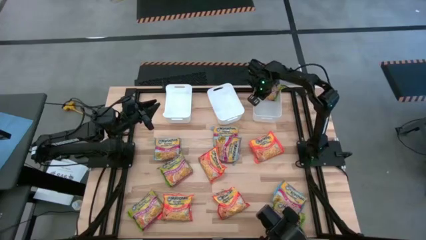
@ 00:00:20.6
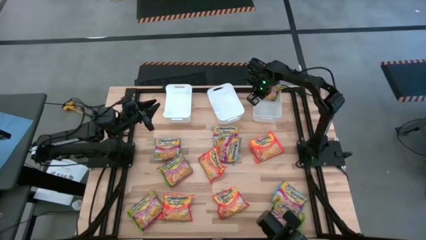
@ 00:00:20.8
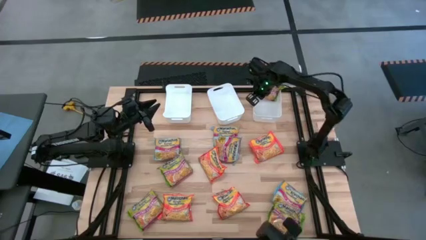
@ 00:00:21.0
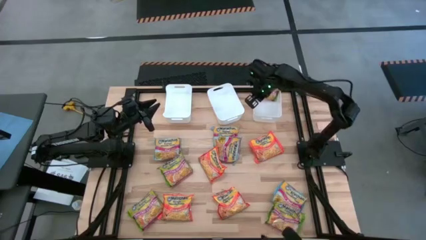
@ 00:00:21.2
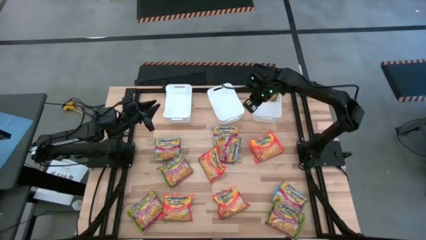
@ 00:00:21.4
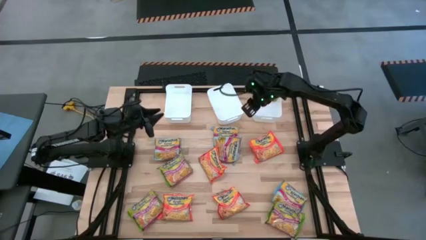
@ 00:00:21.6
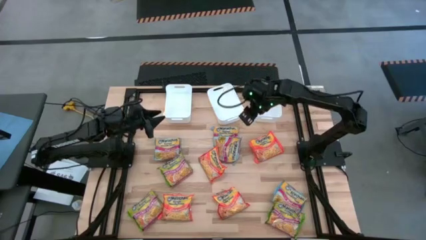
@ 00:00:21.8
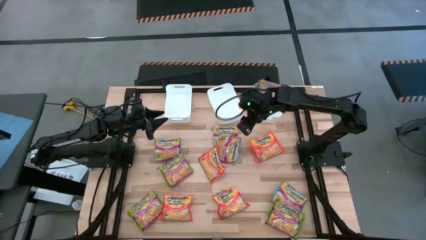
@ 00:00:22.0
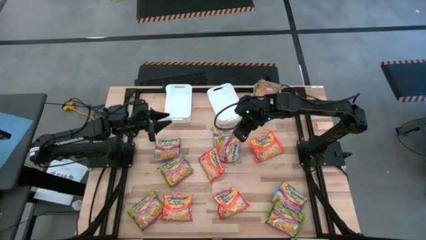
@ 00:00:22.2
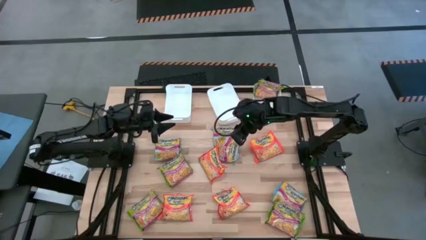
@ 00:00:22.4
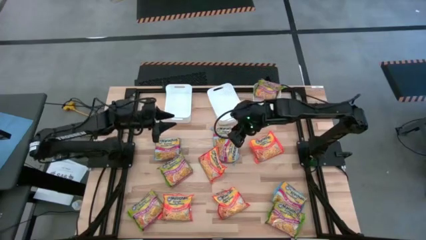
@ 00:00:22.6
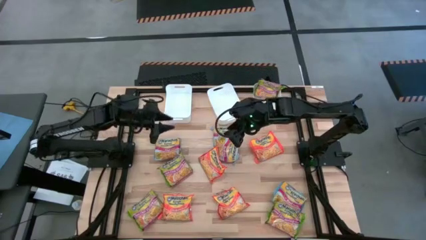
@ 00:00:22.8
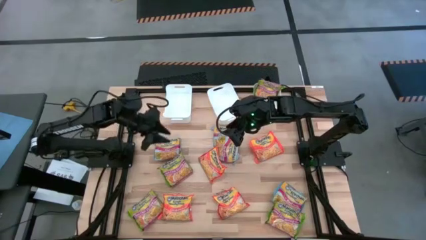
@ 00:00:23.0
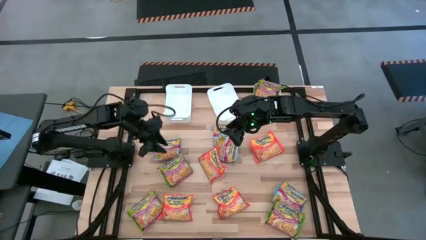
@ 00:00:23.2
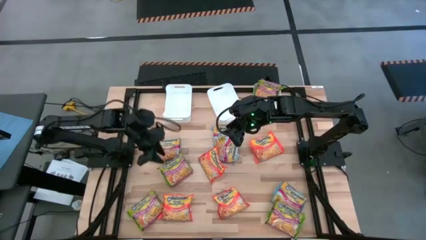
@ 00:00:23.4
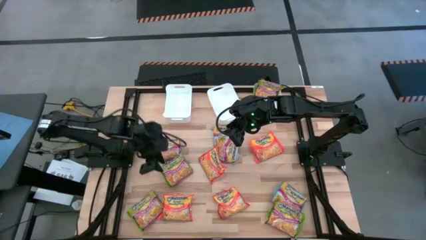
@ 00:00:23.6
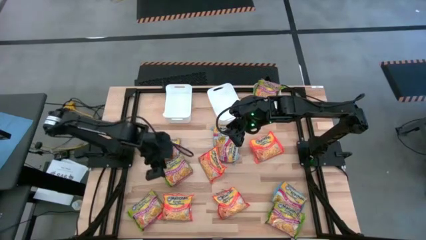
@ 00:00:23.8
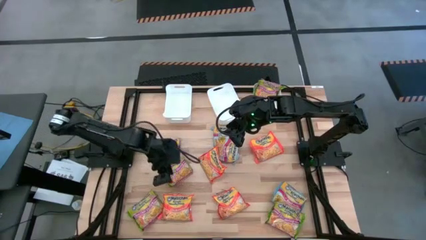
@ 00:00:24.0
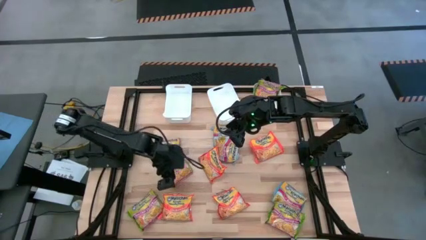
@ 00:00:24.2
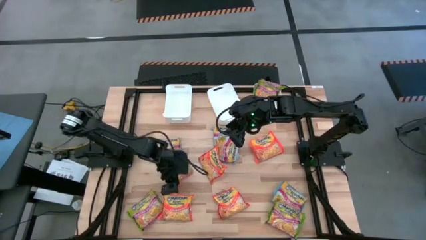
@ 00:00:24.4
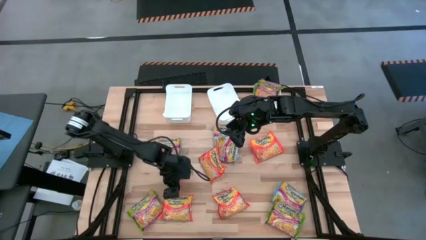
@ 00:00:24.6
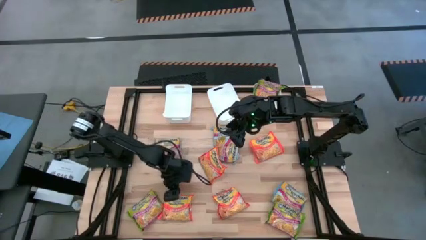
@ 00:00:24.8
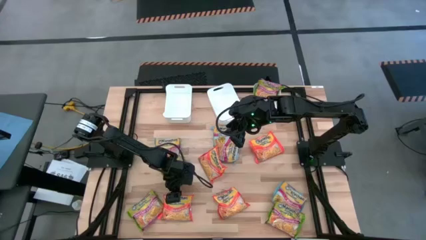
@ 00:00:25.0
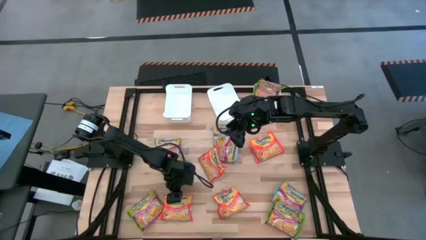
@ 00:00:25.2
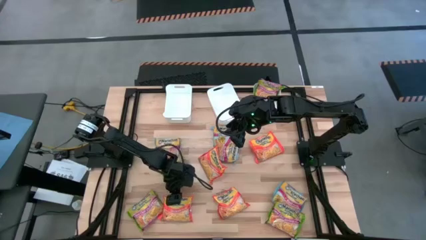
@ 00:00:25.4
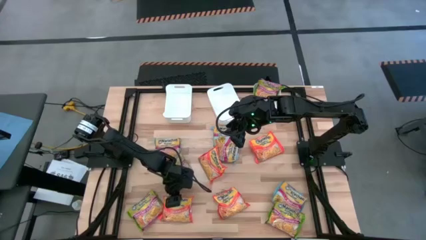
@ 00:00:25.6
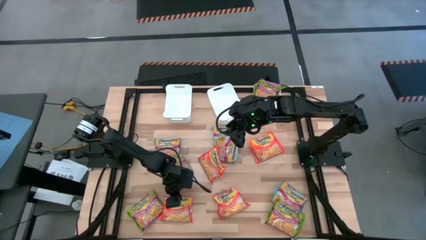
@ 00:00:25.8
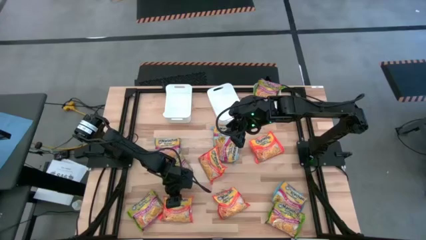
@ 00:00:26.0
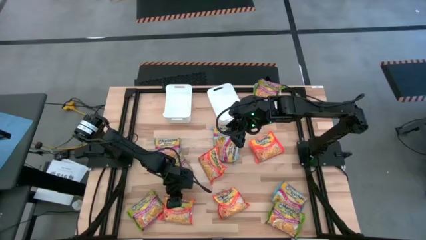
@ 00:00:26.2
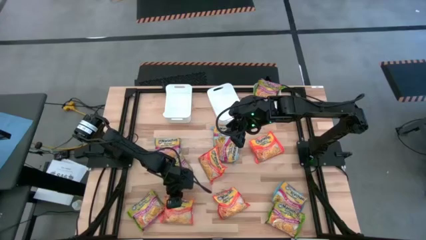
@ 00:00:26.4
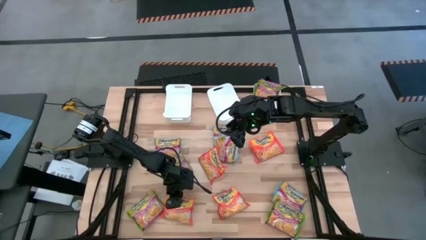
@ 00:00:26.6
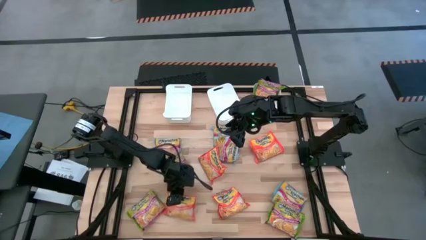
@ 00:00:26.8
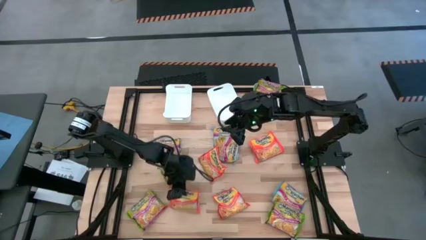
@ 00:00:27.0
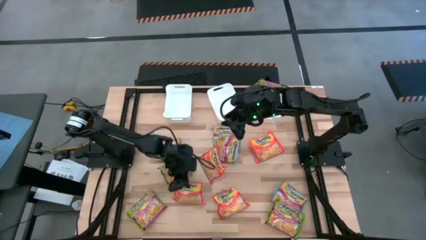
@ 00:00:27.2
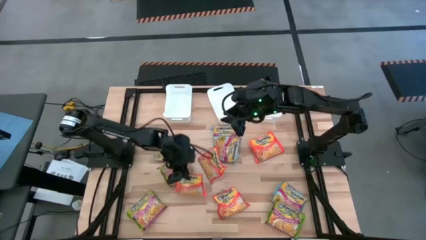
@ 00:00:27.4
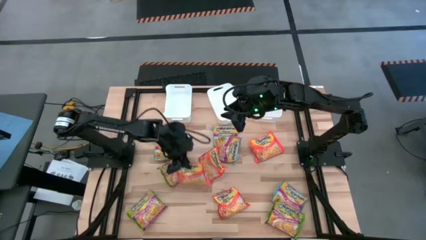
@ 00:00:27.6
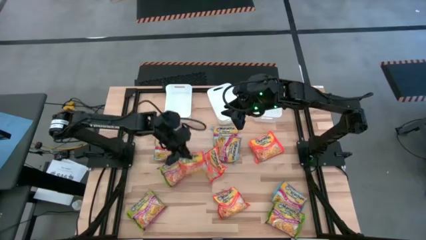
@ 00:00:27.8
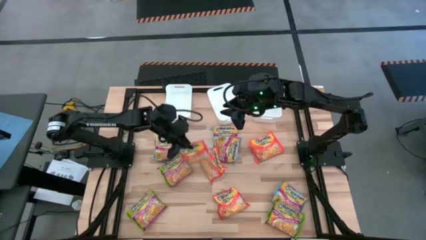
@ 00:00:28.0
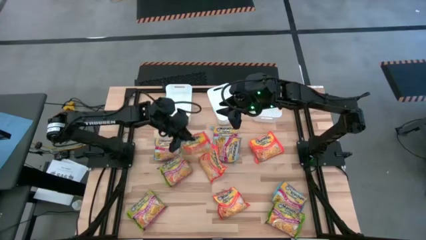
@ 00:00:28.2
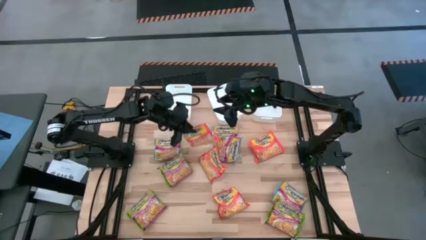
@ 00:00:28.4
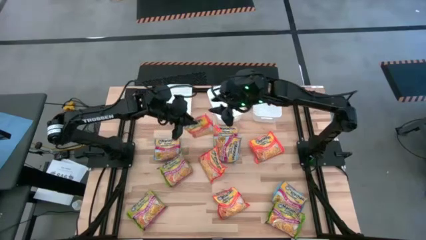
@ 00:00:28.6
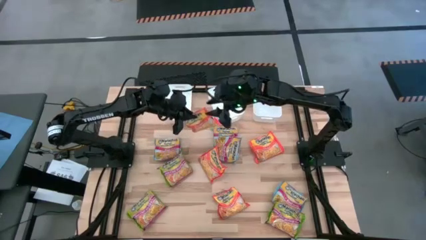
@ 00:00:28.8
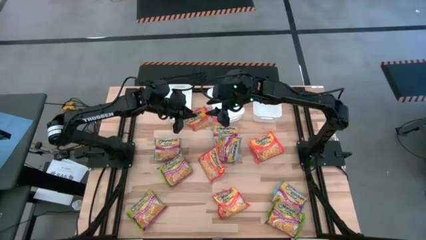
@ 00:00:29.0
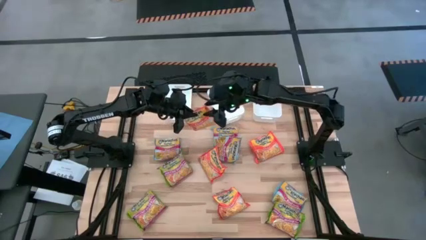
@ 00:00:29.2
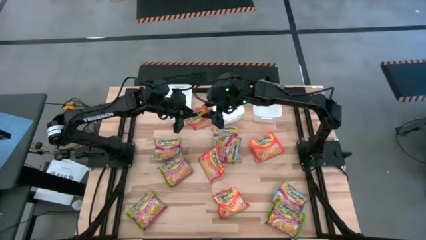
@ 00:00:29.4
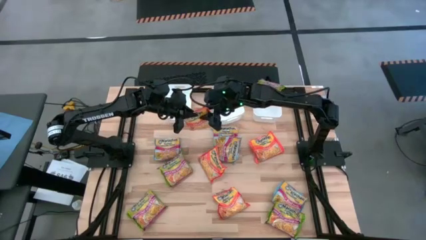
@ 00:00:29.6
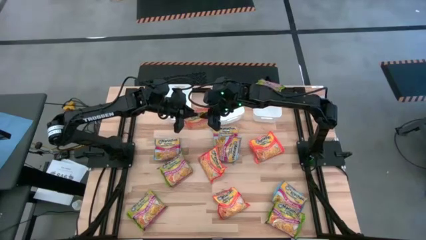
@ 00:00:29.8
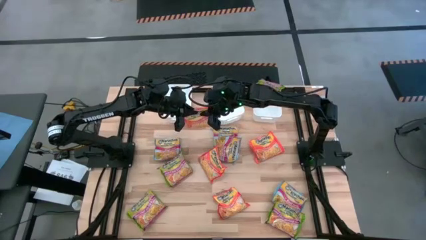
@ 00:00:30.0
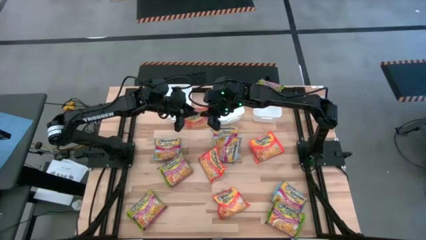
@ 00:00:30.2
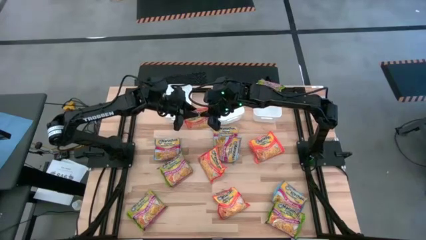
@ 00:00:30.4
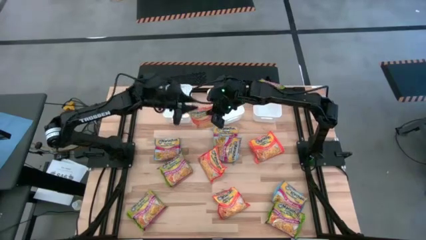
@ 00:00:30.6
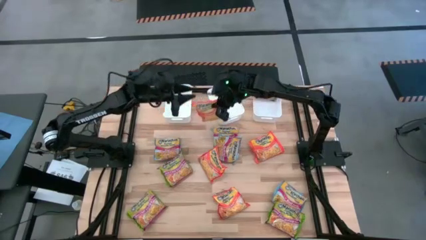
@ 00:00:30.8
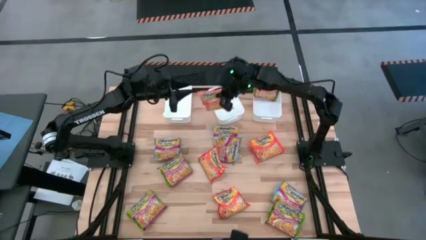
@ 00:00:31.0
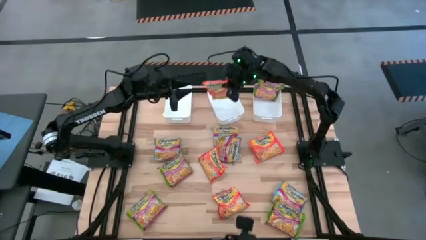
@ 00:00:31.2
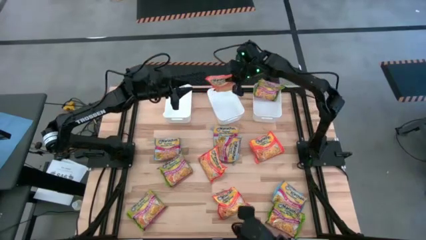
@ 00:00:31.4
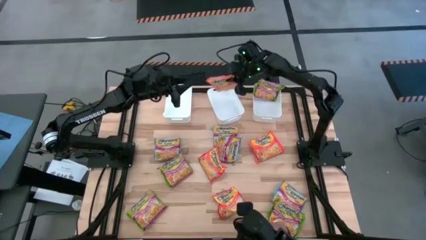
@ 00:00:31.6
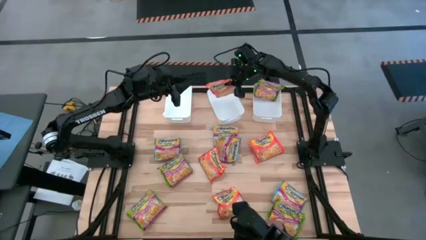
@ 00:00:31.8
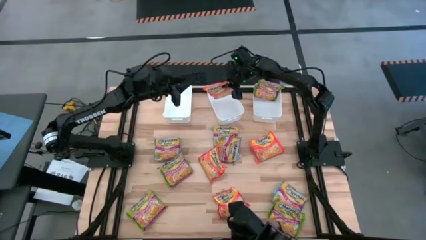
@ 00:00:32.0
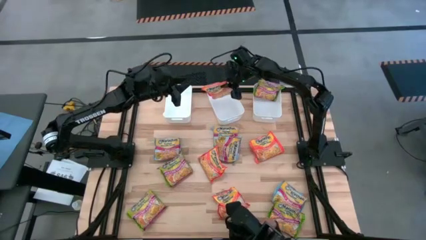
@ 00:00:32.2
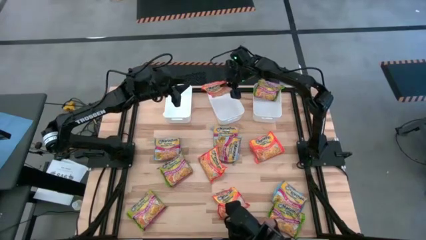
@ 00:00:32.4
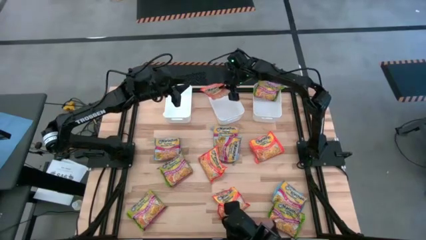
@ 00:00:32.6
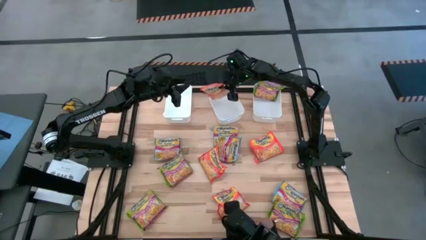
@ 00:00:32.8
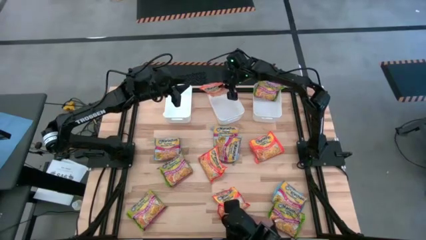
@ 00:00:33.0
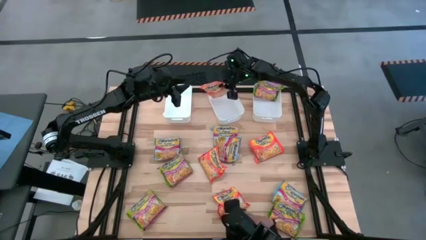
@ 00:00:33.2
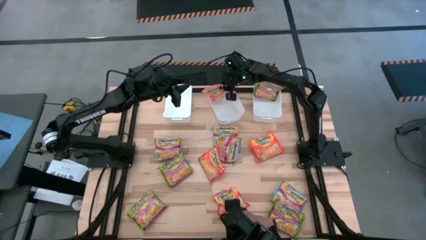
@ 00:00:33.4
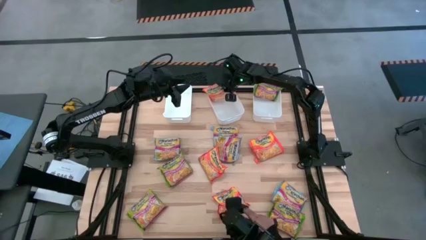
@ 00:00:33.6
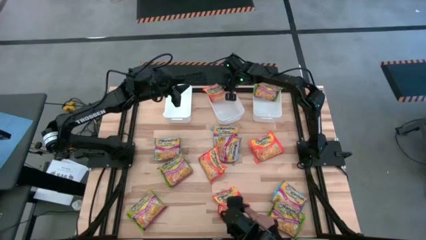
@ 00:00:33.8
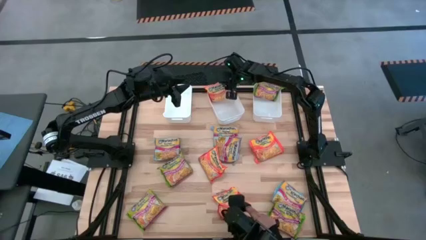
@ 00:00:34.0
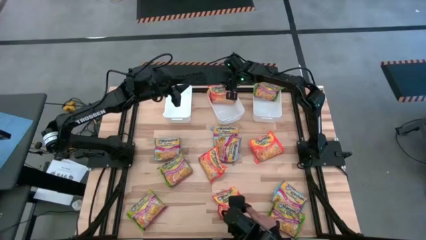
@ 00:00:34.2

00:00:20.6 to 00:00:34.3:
Task: Sort Maruchan noodles
Put the orange noodle pack into the middle white bin

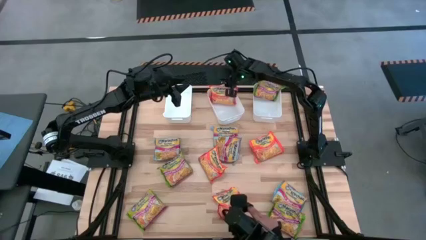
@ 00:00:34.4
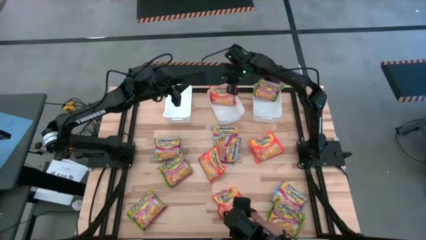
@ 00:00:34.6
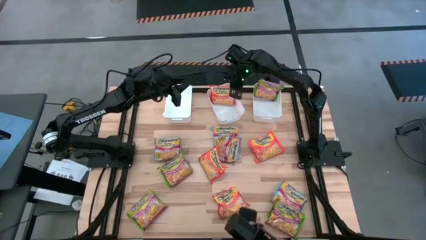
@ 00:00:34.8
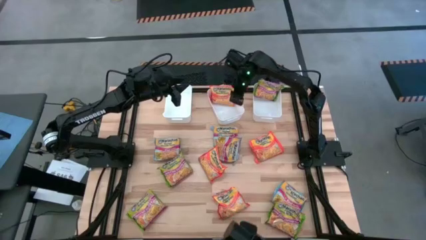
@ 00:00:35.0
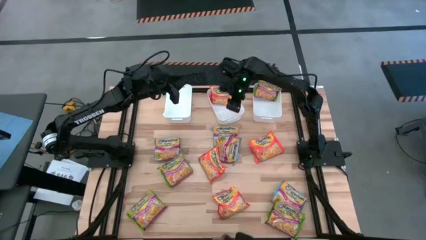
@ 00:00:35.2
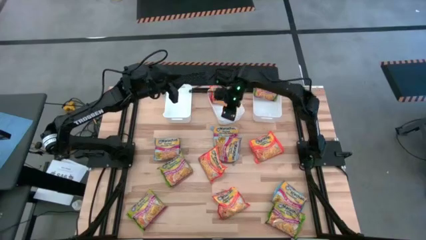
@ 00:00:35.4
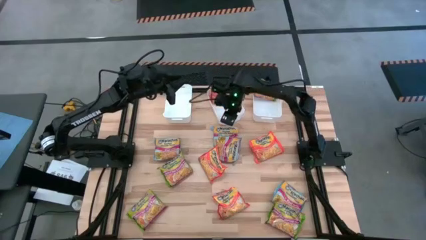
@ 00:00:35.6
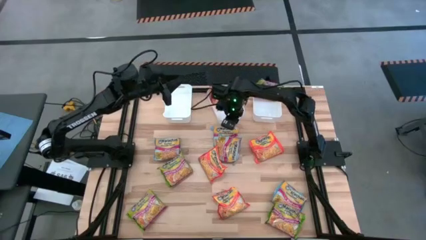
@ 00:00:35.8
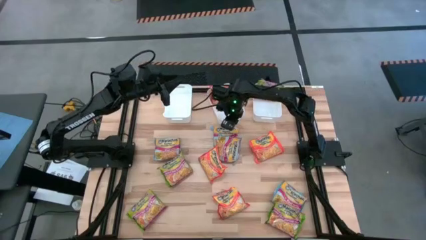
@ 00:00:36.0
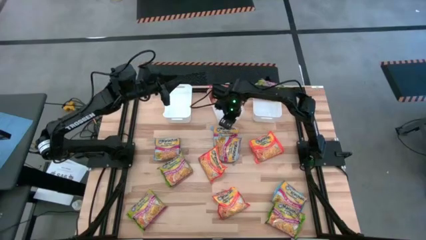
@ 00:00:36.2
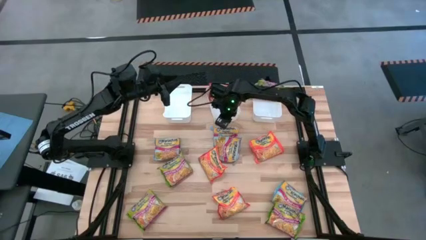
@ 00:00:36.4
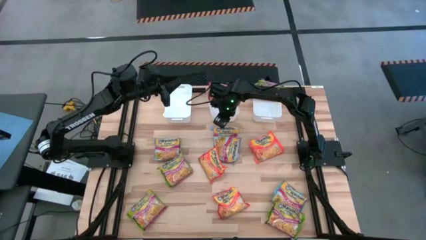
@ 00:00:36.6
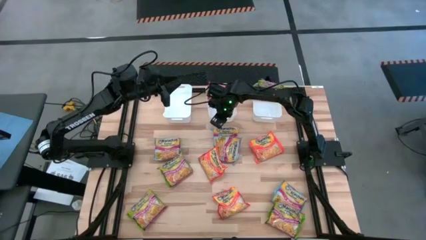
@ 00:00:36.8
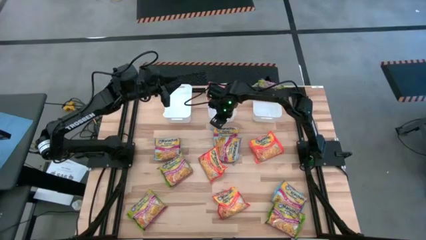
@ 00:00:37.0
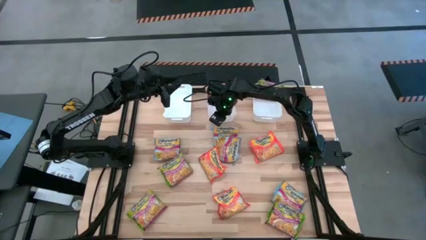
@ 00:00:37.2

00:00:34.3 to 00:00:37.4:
Adjust the middle white bin
